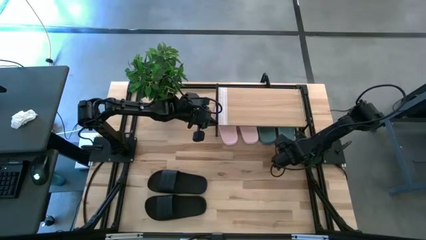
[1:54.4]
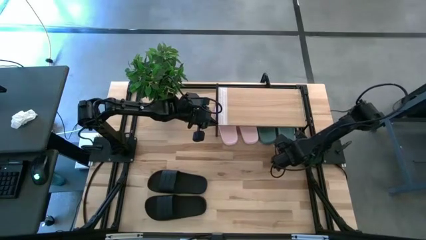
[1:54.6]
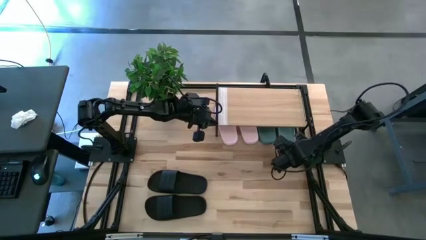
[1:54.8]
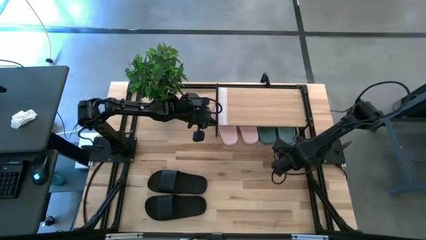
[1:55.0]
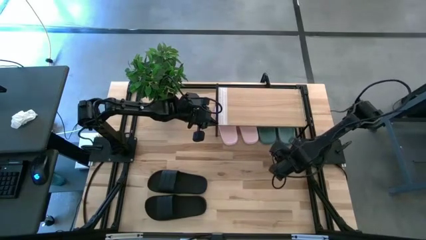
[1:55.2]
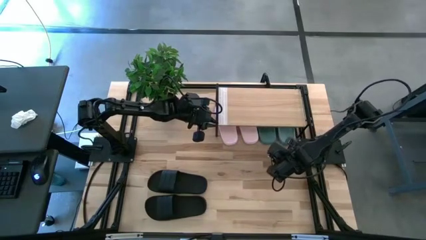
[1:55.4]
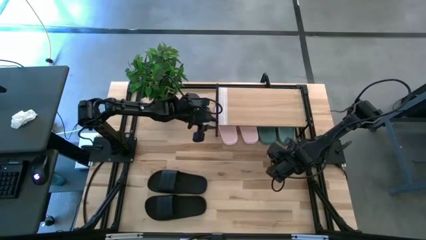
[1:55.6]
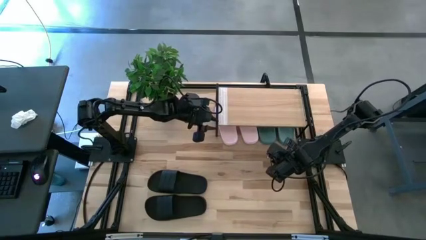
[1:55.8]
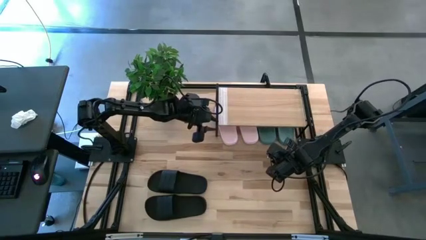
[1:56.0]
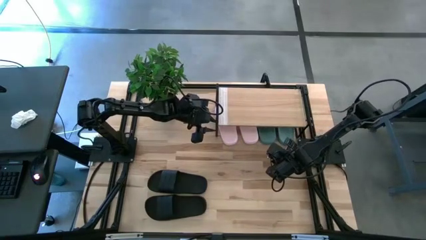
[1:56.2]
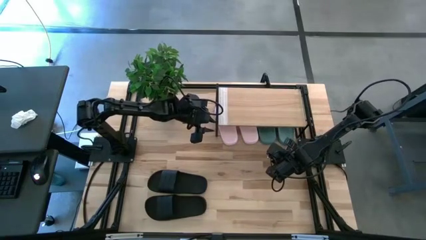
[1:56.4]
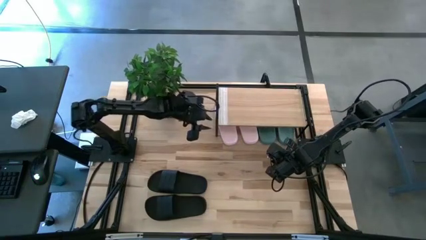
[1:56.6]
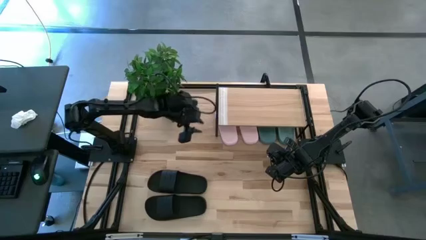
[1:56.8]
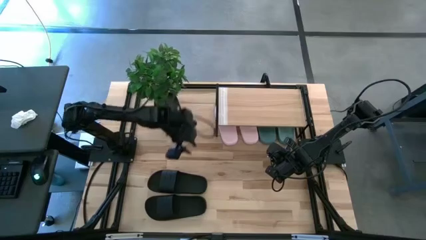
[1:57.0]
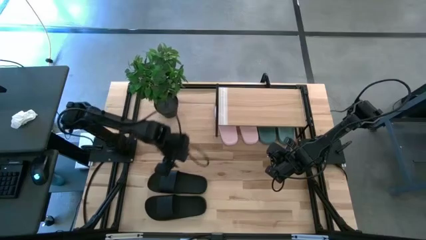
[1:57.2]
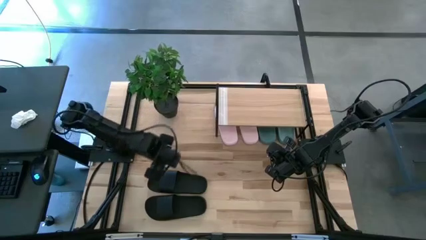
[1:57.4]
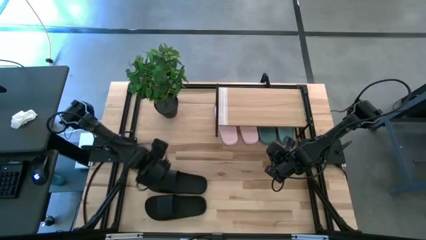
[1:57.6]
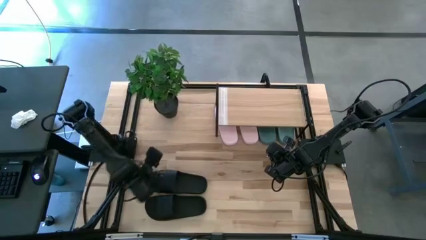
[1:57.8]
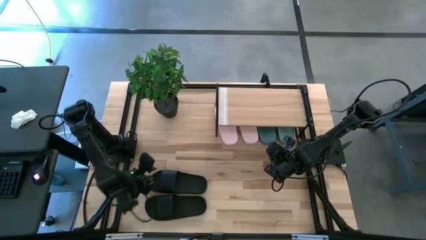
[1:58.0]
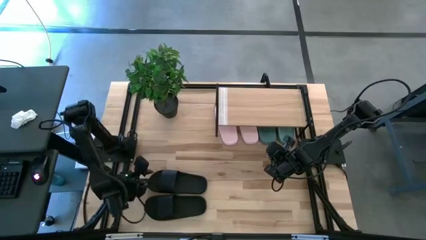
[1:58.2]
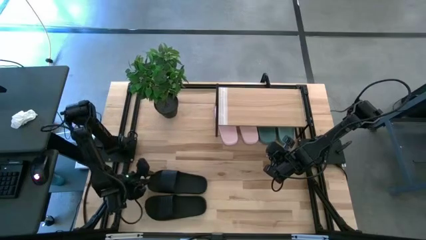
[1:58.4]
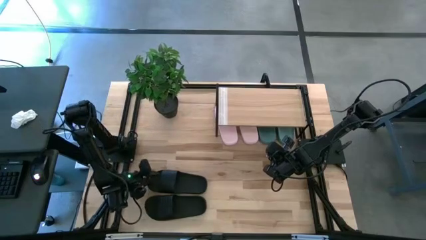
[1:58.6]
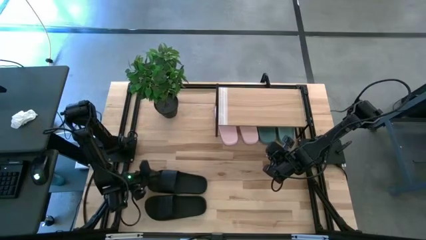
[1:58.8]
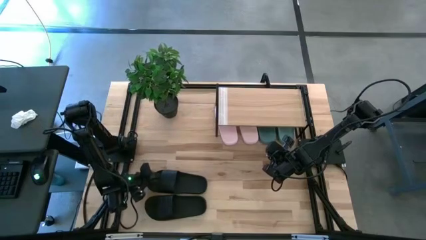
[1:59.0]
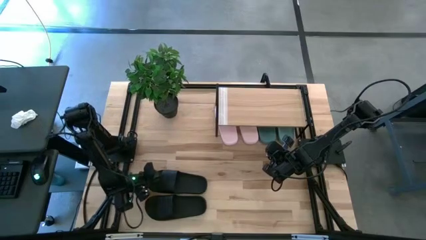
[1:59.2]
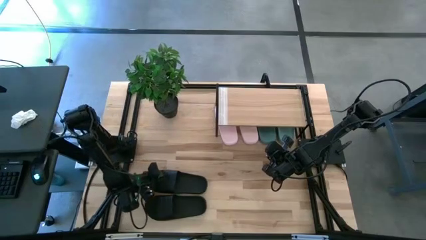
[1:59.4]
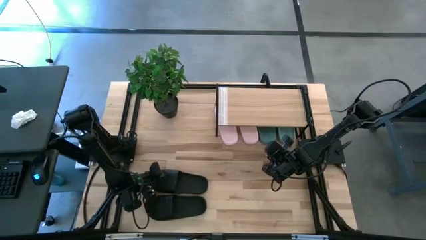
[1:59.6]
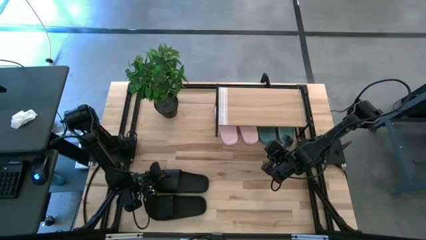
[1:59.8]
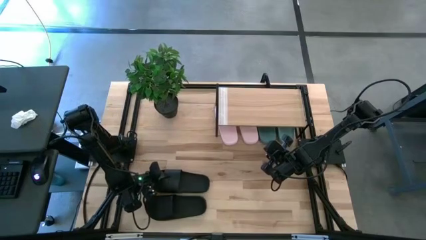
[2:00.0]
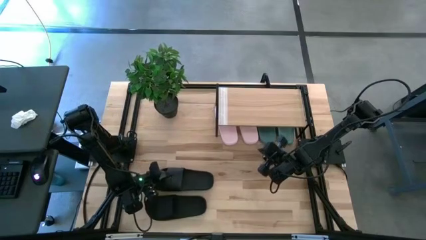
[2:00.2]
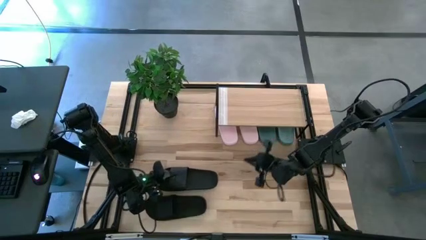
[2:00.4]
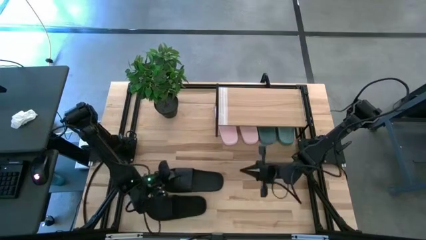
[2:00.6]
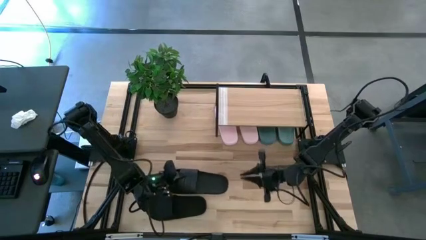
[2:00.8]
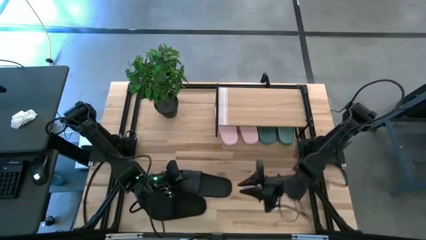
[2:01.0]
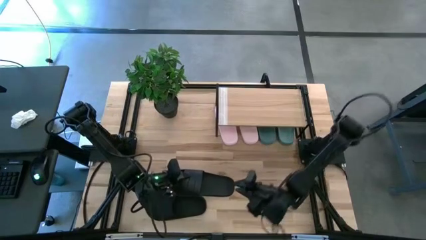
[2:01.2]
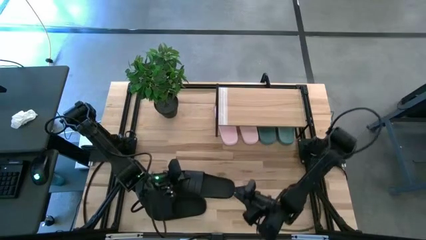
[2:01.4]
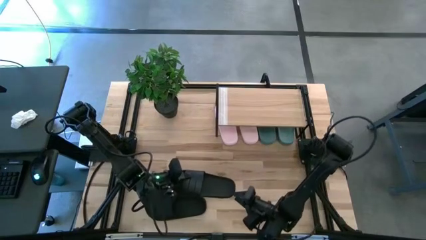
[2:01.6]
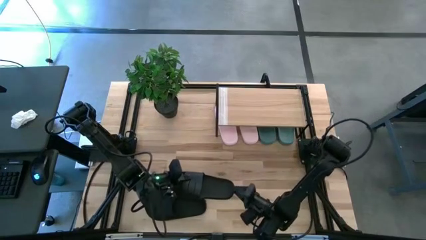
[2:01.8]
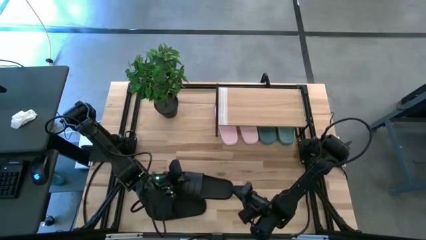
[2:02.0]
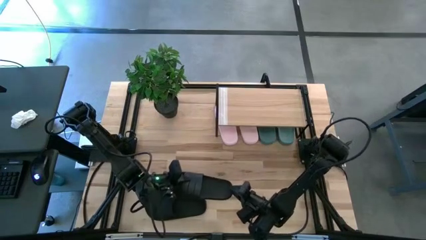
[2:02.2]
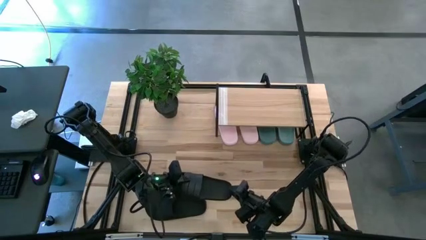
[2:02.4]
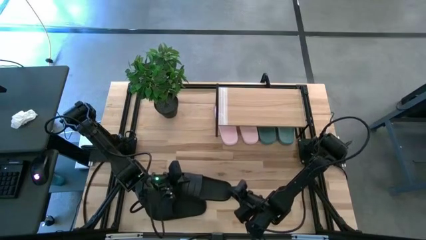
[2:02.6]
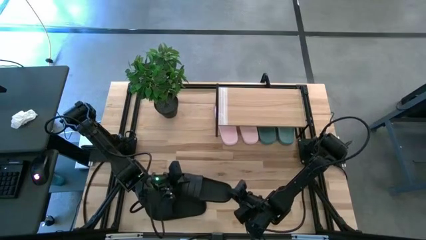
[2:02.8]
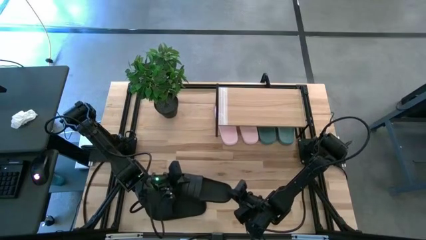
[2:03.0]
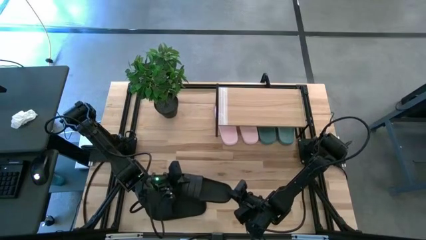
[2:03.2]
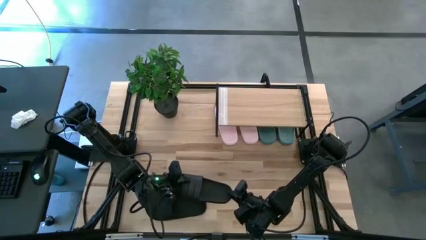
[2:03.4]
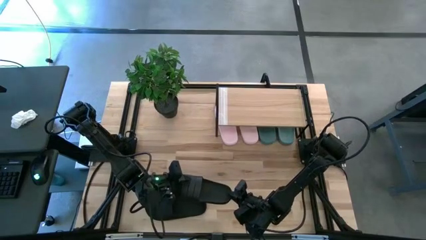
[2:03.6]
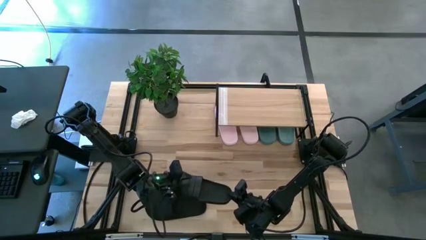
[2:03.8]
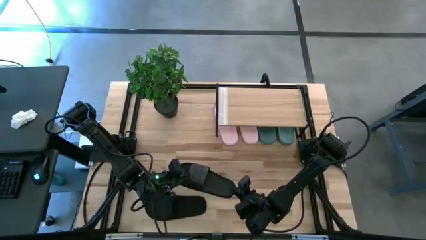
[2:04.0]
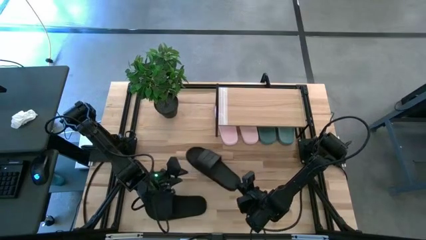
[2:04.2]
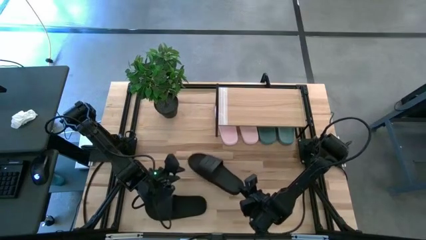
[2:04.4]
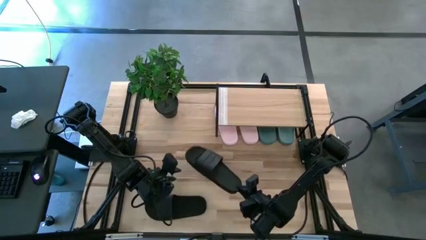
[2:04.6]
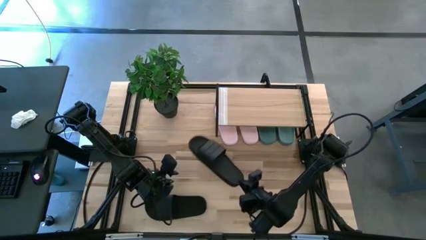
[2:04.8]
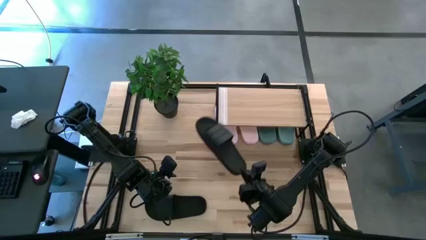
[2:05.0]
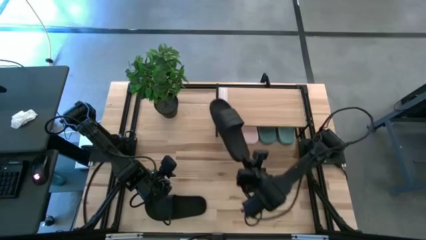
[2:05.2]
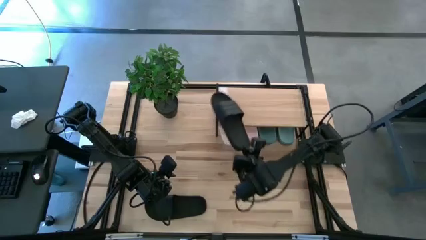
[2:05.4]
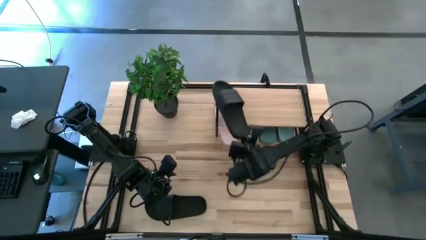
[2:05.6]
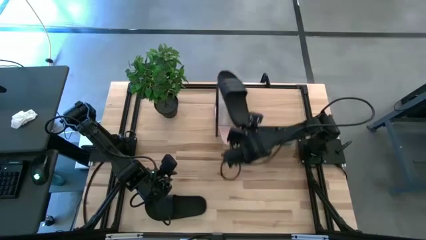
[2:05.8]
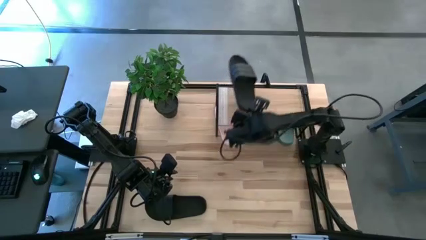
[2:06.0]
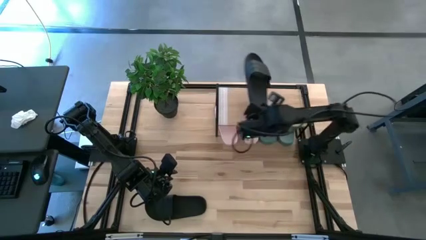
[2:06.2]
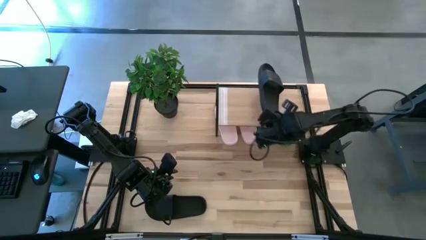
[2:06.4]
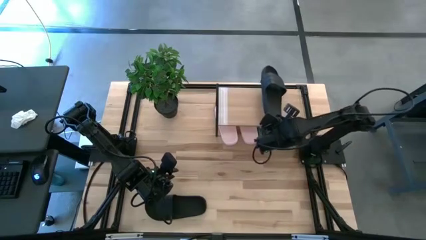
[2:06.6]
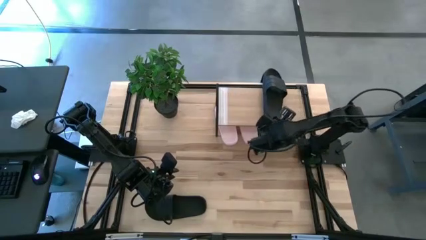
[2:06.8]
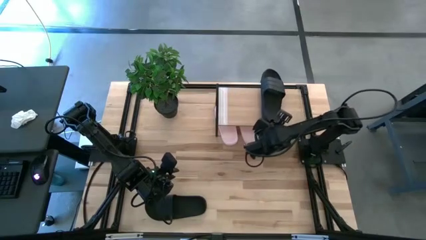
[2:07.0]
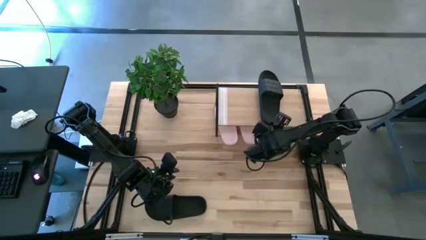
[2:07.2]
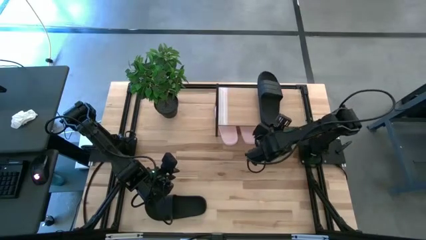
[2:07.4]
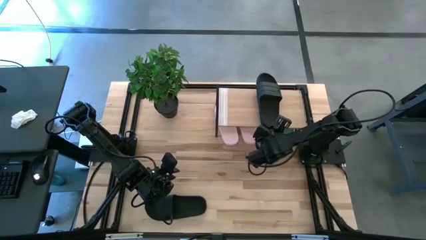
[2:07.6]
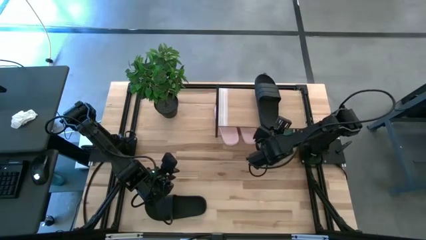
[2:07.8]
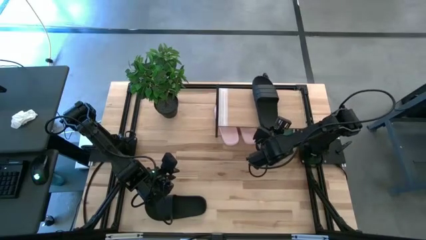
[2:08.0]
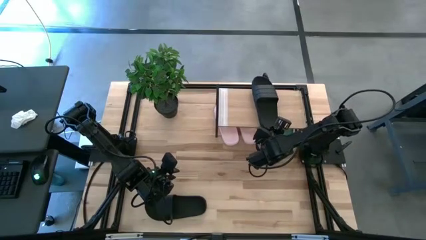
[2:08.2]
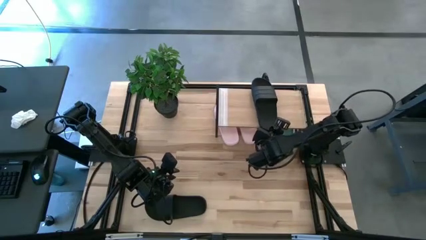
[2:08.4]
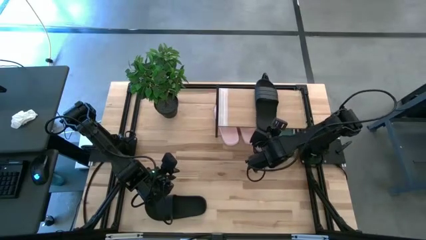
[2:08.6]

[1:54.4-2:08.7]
Task: Pick and place slides into the shelf
Put the top black slide on the shelf

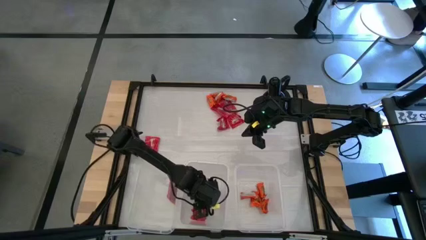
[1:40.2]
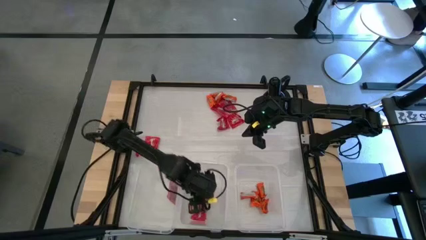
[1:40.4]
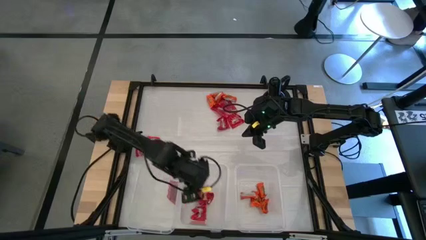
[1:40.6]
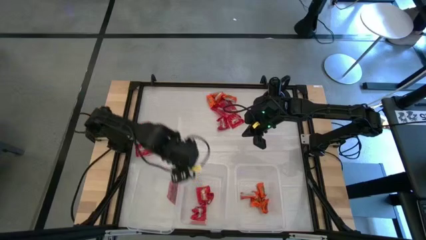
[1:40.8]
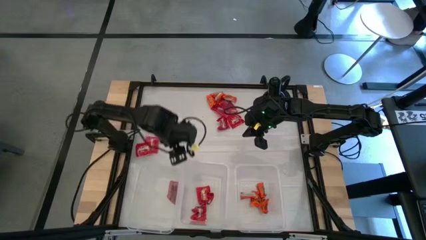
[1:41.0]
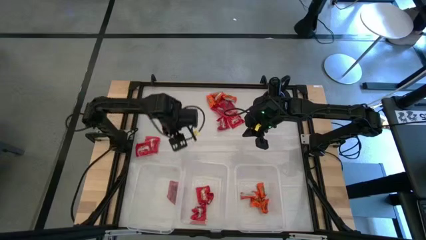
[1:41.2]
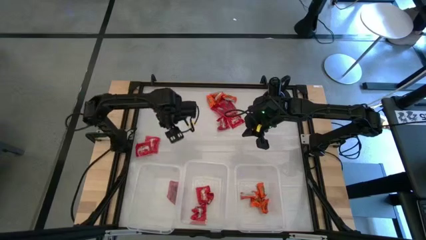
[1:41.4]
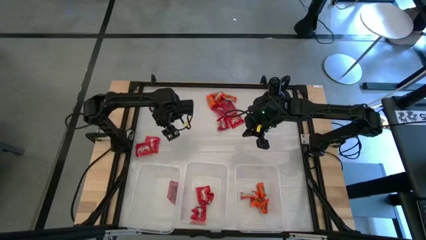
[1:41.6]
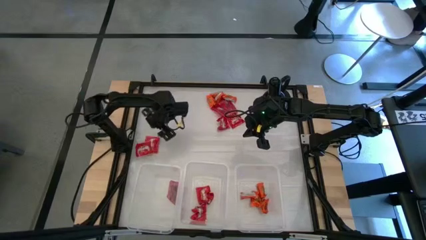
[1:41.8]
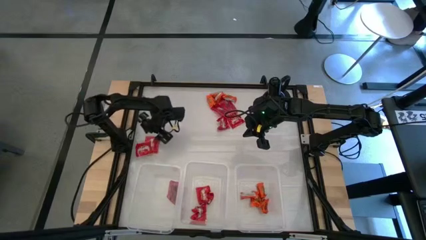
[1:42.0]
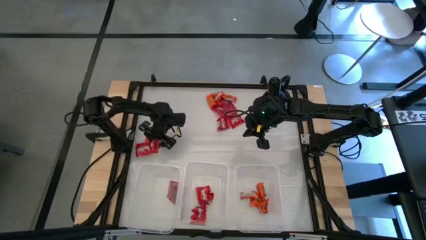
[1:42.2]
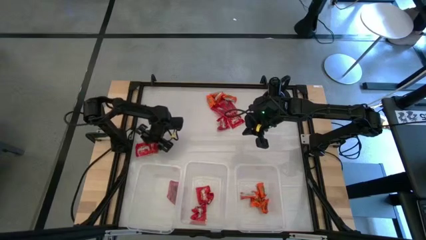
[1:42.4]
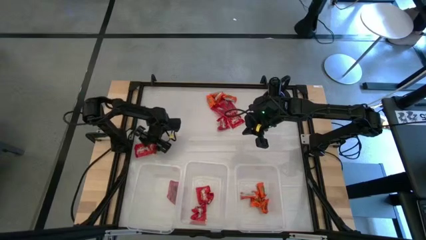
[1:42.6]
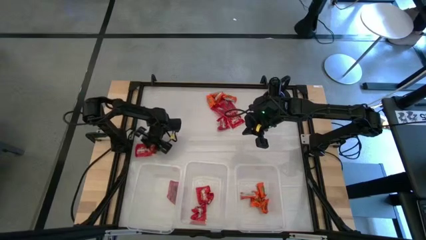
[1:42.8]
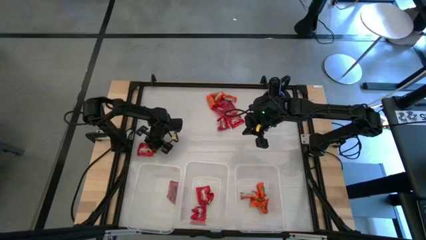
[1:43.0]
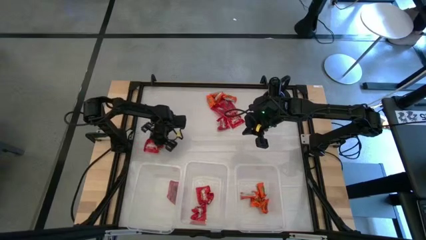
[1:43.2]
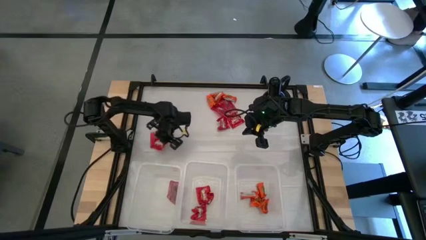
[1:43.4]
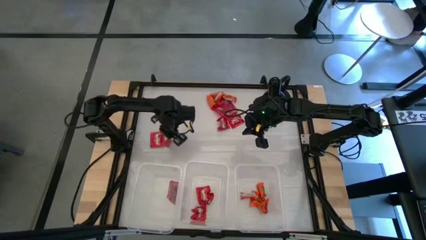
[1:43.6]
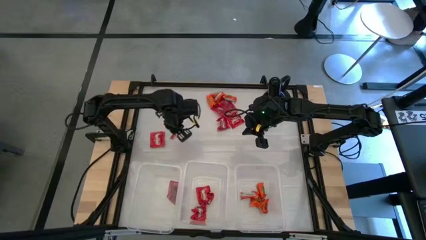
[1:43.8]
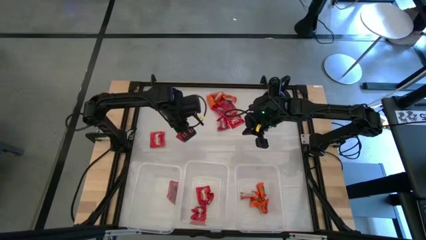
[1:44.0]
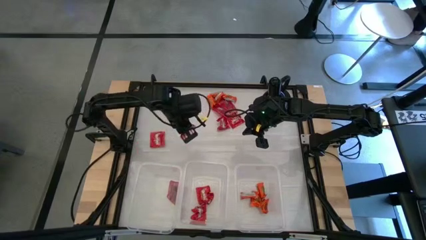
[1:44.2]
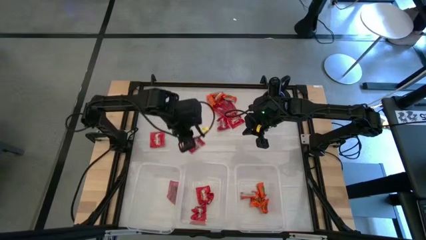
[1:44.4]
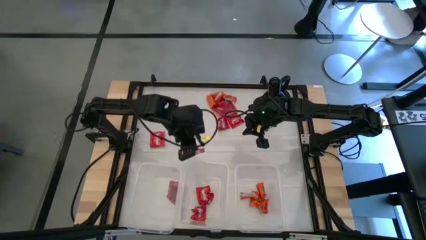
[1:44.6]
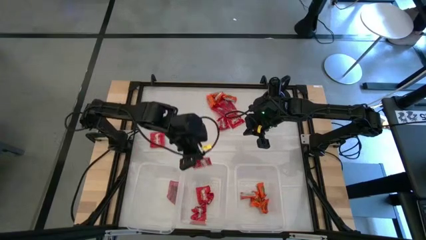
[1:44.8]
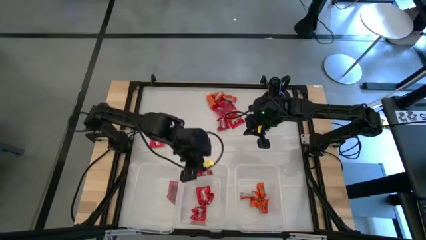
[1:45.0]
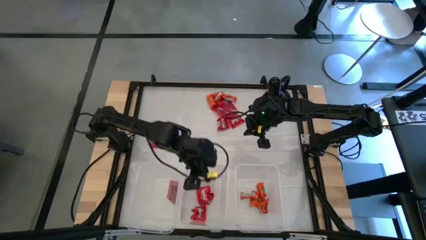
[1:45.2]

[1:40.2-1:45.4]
Task: Sort candy
Put the red candy into the middle transparent bin
